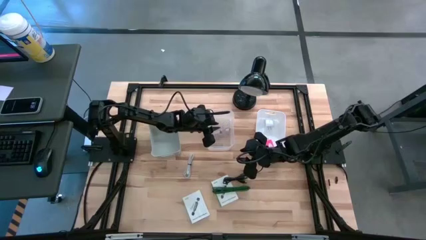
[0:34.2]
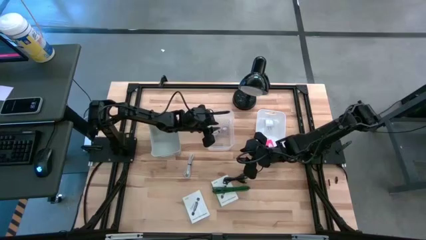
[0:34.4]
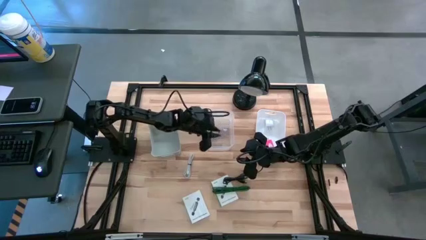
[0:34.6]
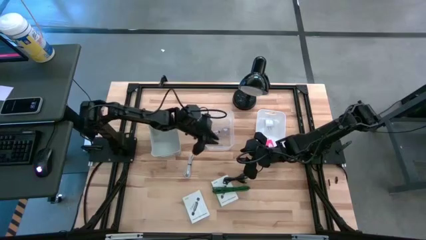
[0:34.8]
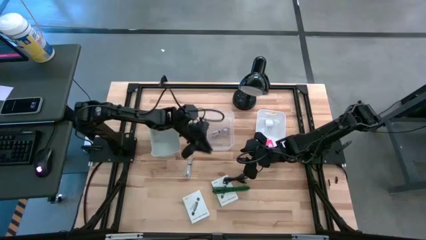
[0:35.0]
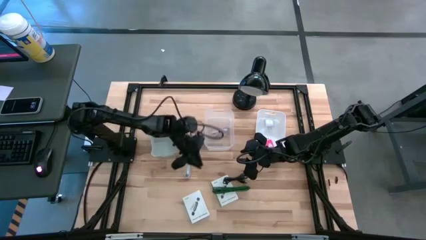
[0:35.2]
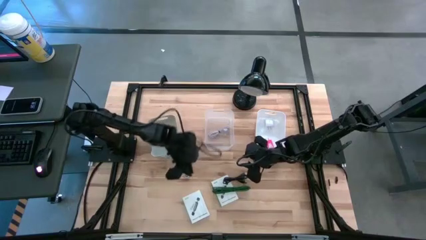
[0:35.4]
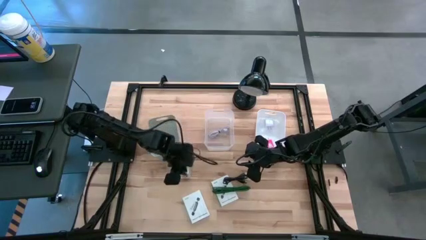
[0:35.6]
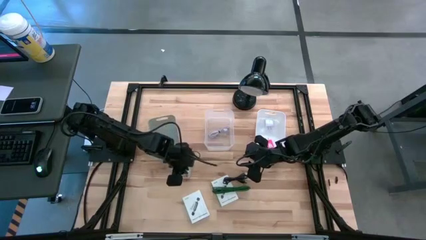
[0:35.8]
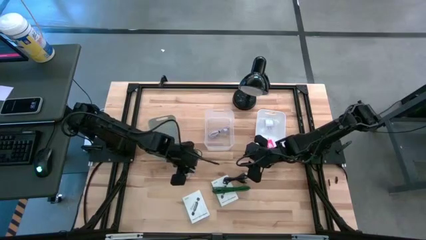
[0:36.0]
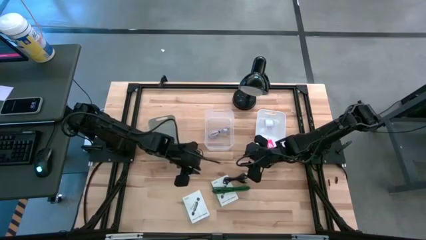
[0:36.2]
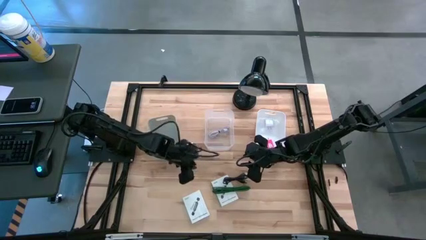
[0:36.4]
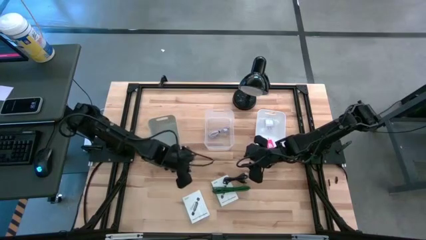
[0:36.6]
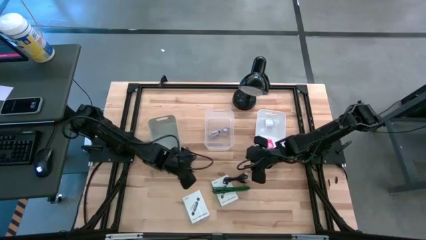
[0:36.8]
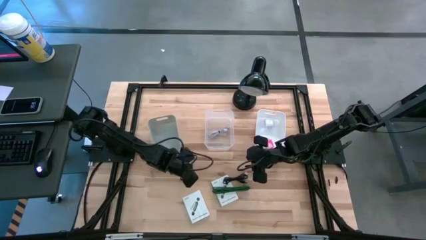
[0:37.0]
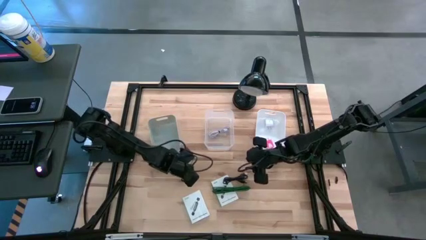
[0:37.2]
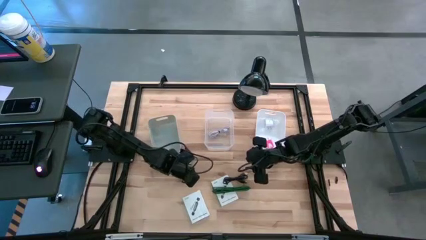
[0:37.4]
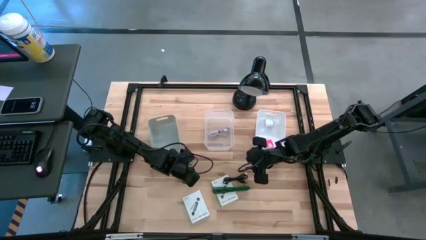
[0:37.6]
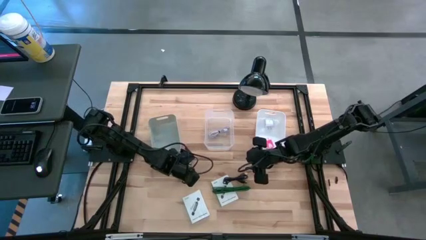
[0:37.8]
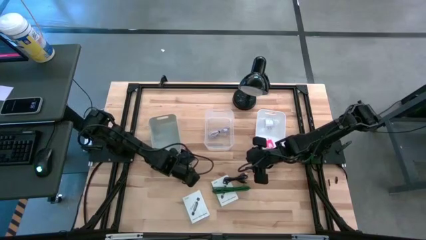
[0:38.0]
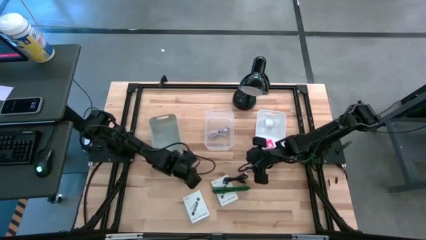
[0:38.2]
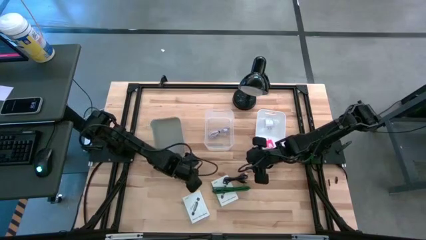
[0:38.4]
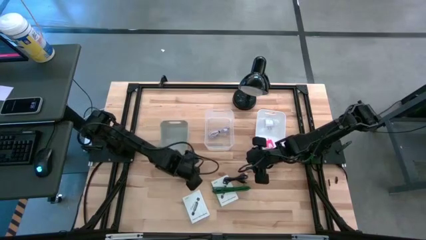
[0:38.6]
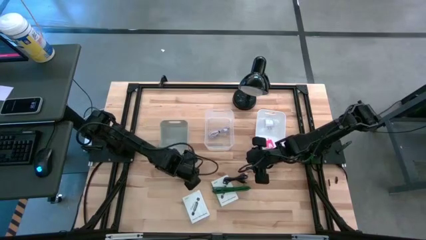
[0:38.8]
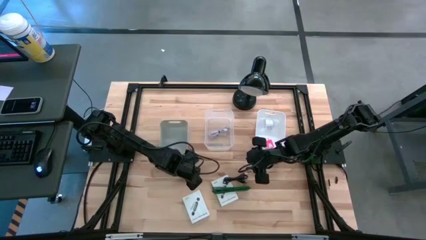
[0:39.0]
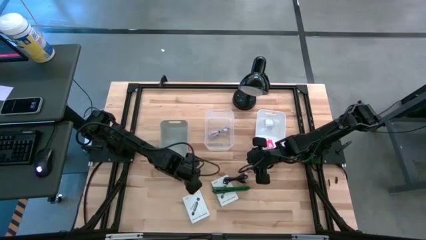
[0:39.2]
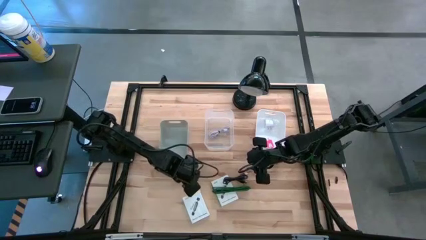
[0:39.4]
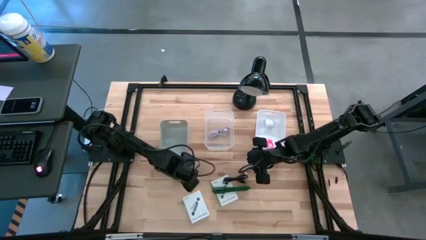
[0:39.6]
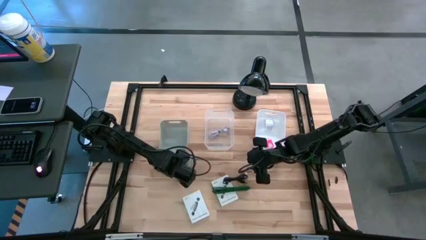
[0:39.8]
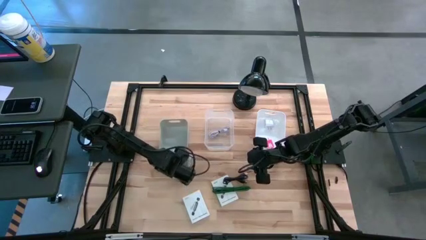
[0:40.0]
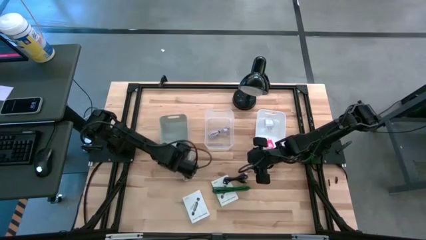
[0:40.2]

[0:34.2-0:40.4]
Task: Pick and place items into bin
Adjust the gray bin

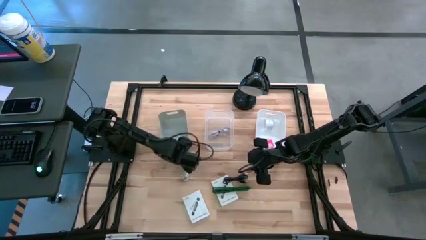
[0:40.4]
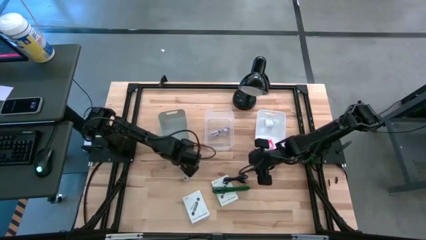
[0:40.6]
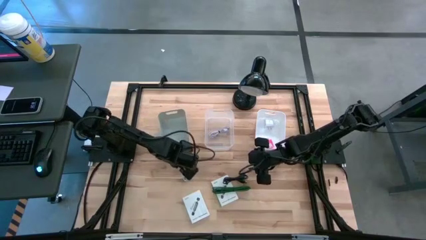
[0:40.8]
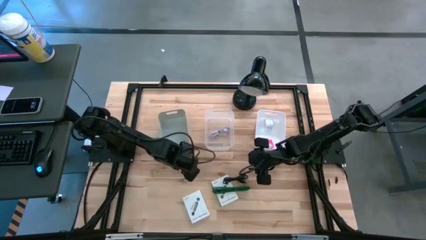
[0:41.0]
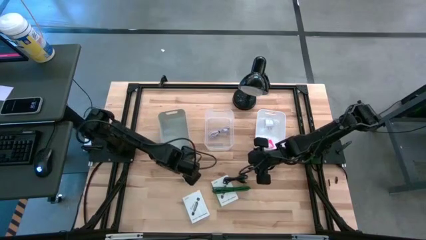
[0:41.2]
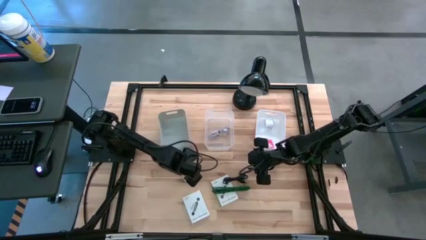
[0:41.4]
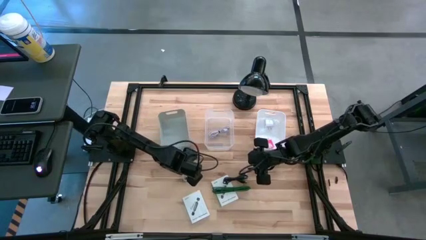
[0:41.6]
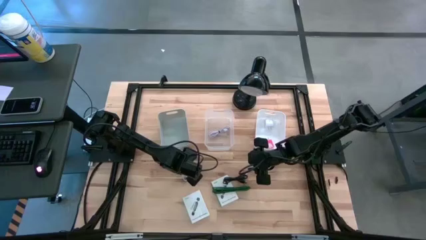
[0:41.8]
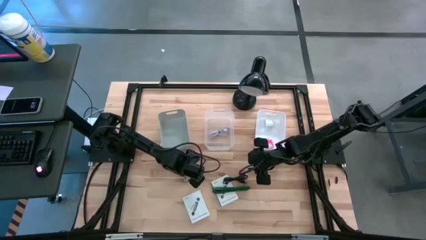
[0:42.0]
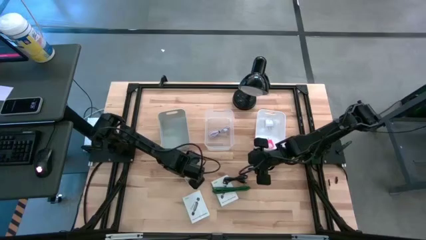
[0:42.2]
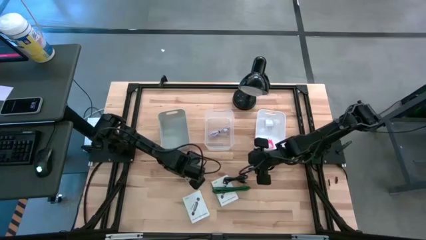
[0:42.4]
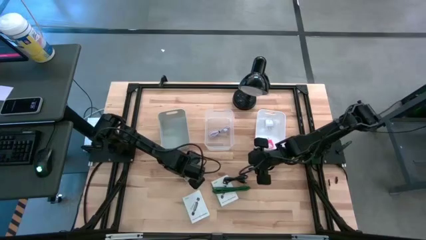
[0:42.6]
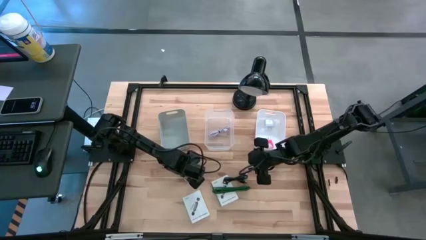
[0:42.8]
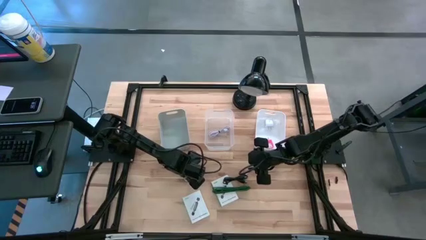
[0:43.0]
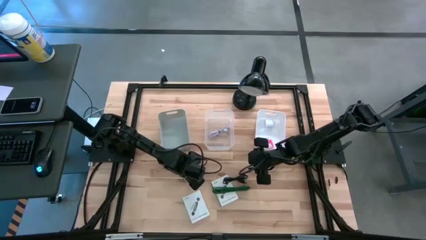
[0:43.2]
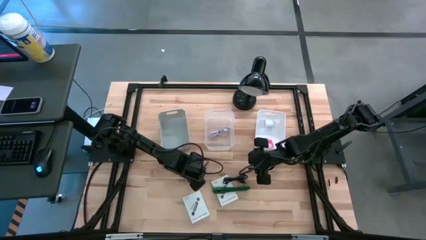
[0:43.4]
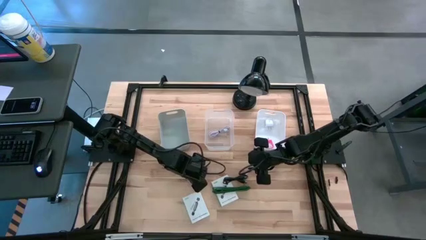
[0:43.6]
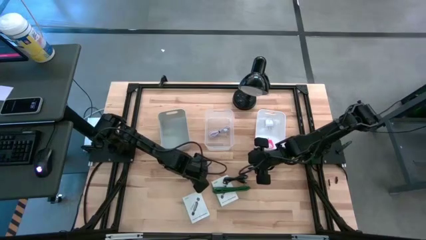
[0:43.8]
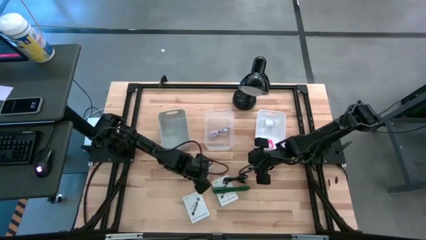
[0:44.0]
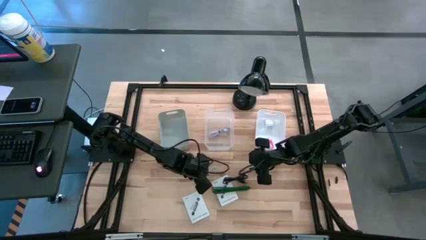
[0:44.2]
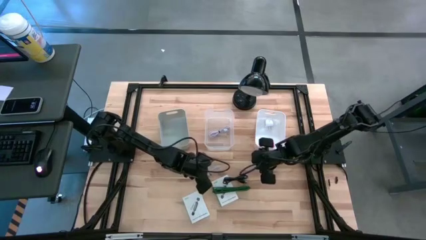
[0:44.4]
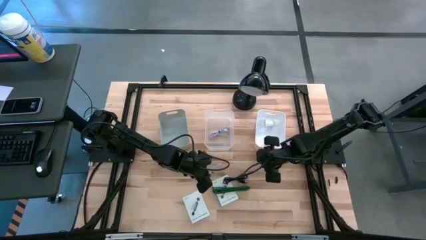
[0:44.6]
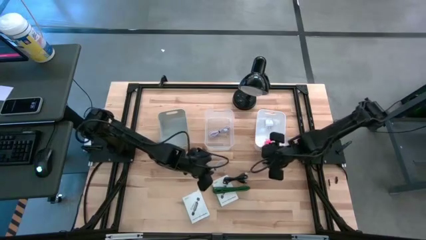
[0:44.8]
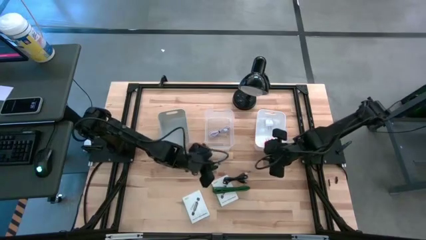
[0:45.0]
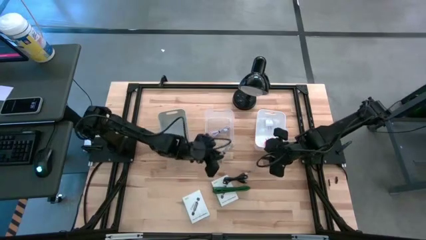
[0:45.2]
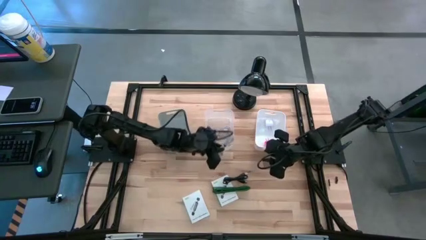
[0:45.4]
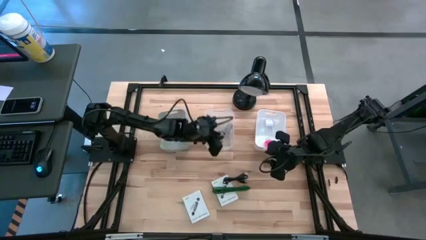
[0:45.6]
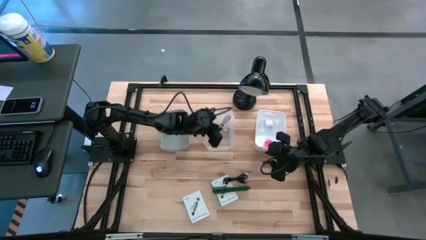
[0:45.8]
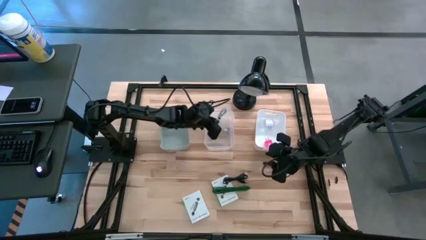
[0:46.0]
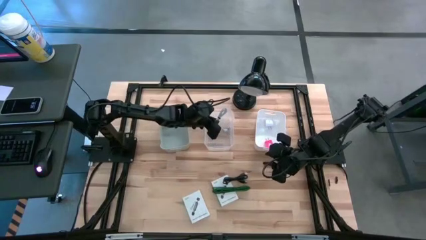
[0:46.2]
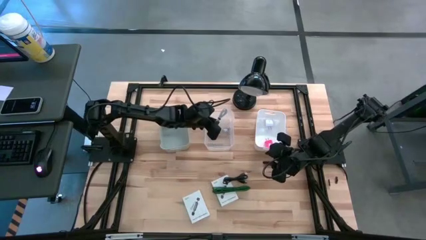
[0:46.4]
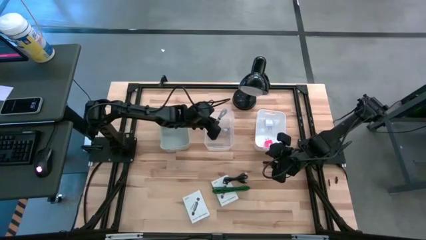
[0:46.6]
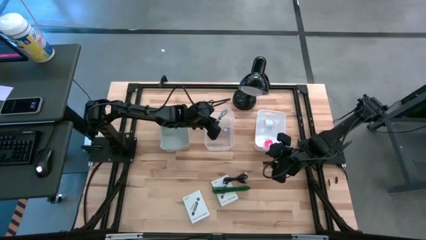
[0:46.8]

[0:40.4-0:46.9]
Put the white charger cable into the transparent bin

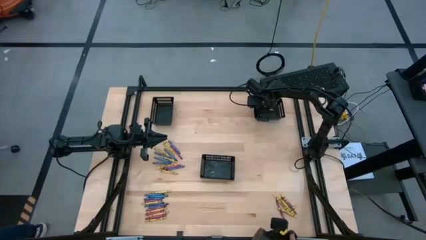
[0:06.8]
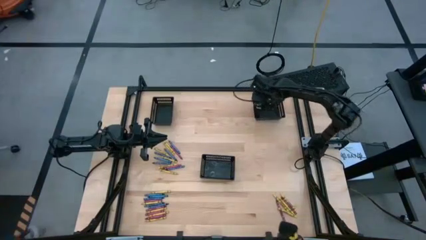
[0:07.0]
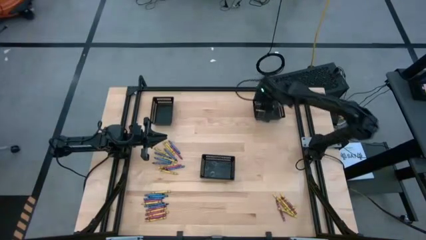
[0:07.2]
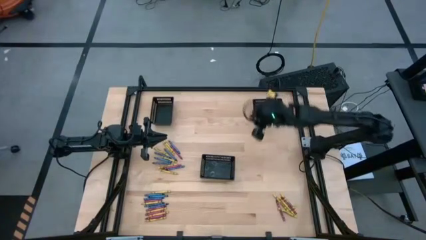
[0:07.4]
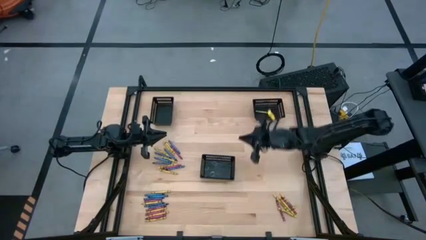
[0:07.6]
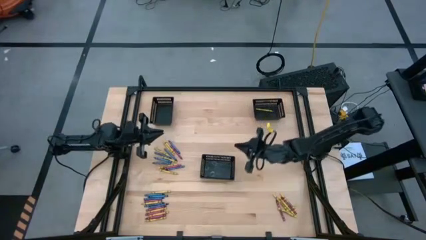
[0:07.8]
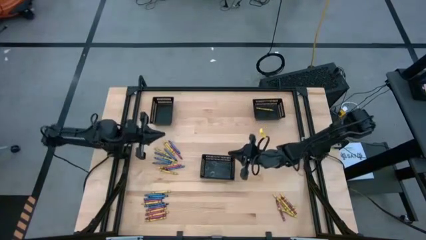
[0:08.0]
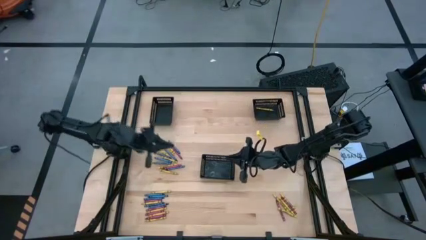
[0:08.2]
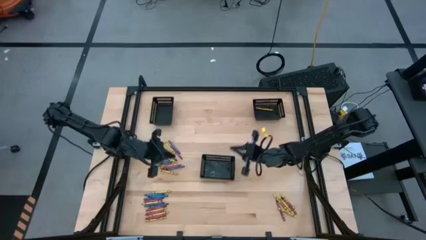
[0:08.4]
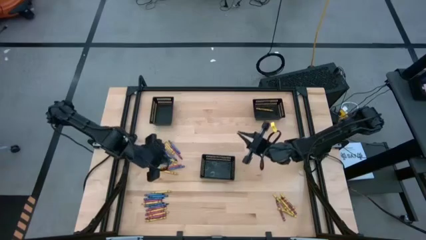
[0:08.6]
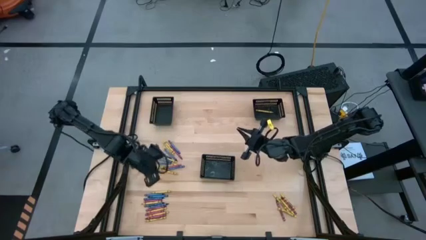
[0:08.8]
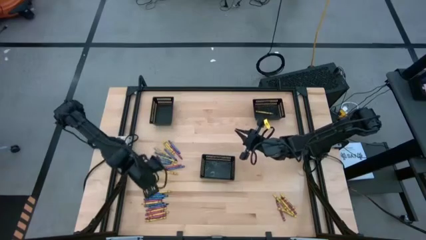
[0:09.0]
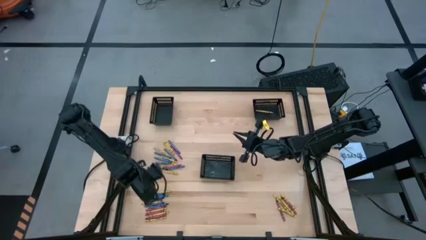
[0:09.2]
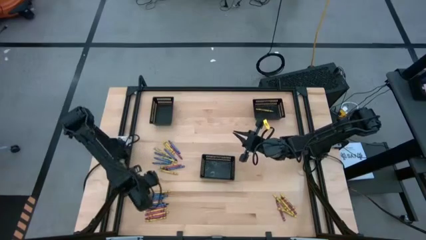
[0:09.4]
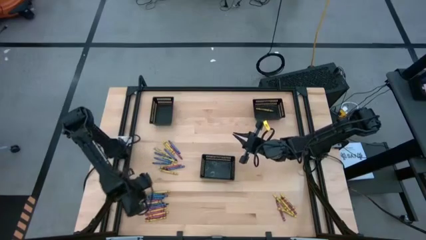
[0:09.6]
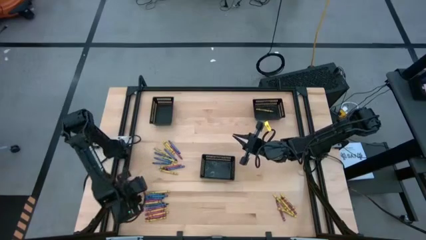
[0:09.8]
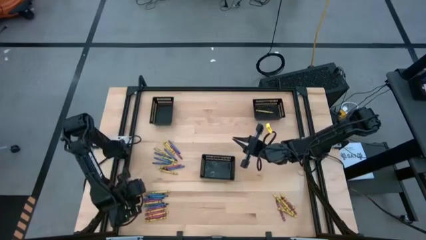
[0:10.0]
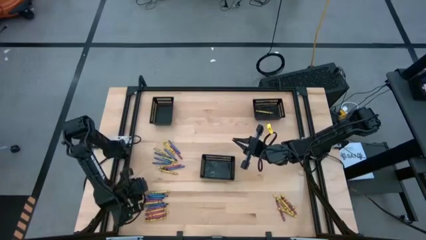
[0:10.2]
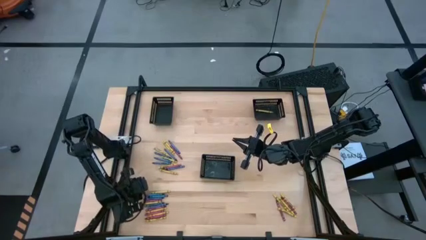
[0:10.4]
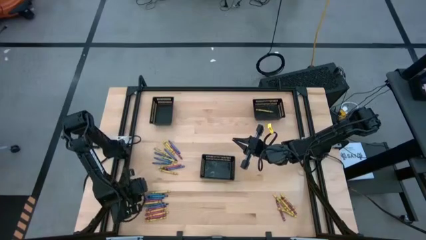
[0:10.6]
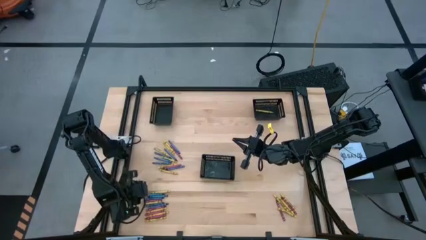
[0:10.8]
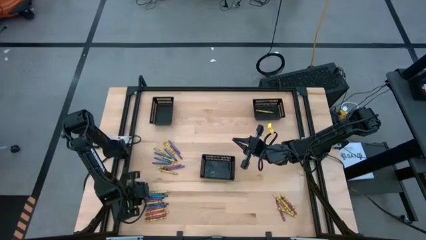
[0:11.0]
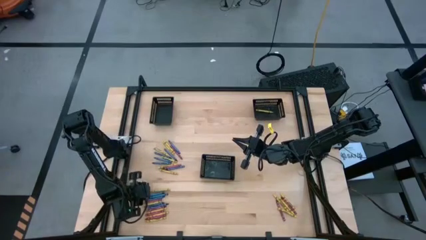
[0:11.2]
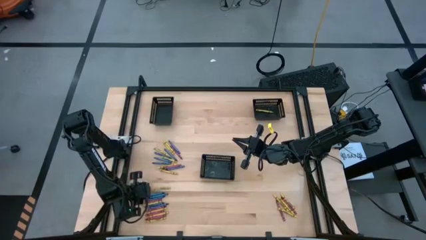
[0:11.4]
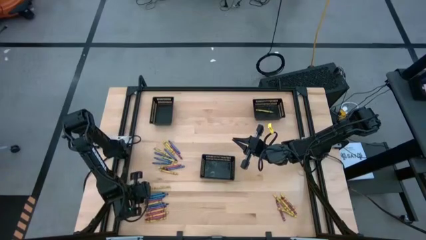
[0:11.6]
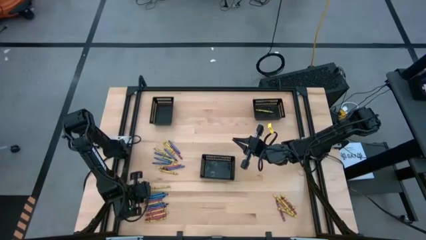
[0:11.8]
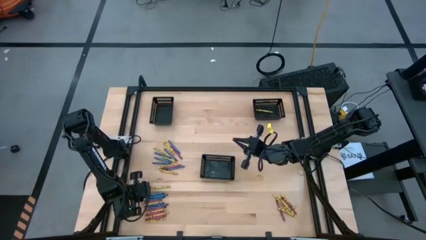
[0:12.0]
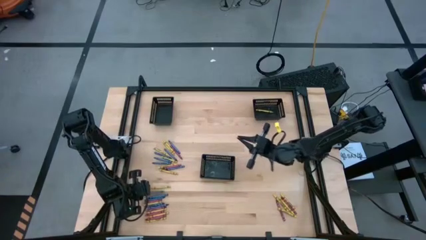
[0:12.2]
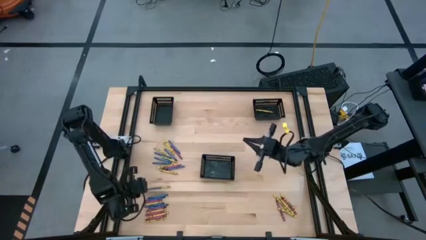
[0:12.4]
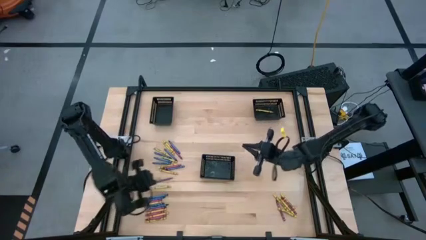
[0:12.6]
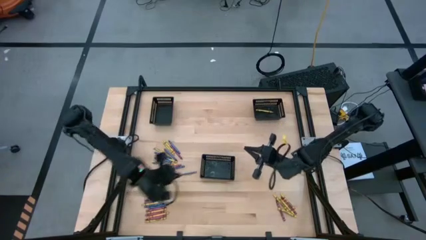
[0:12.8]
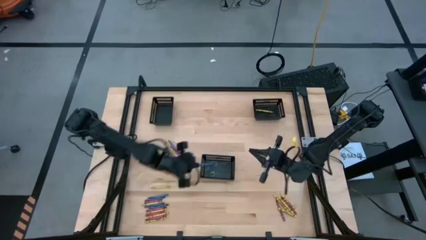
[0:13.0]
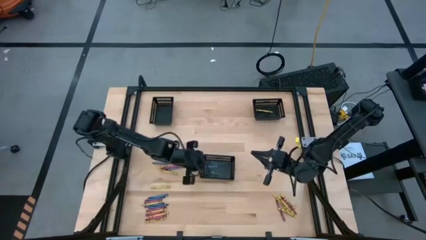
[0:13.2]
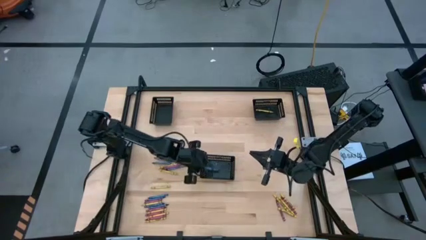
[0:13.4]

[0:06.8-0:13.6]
Task: Sort crayons
Put the blue crayon into the bottom black bin
